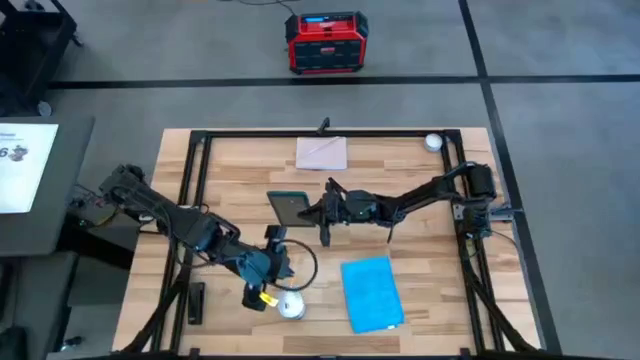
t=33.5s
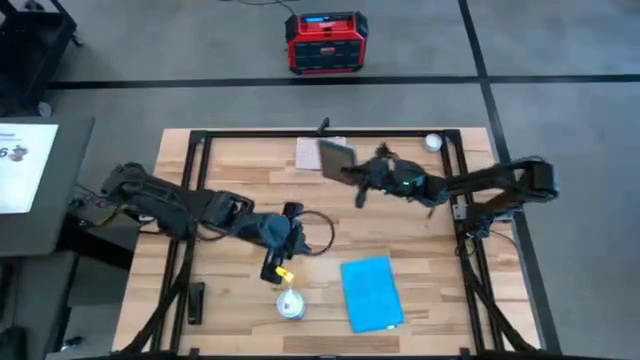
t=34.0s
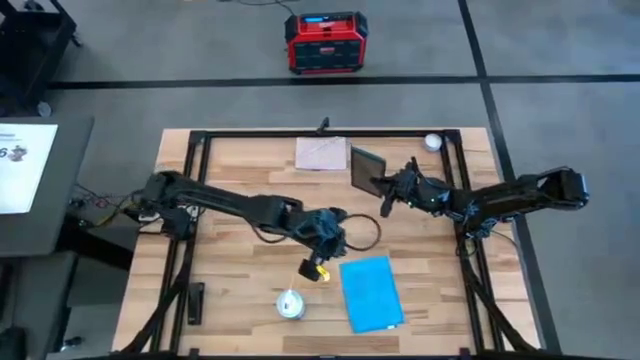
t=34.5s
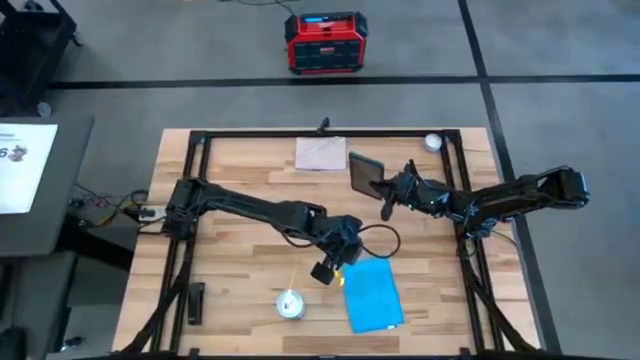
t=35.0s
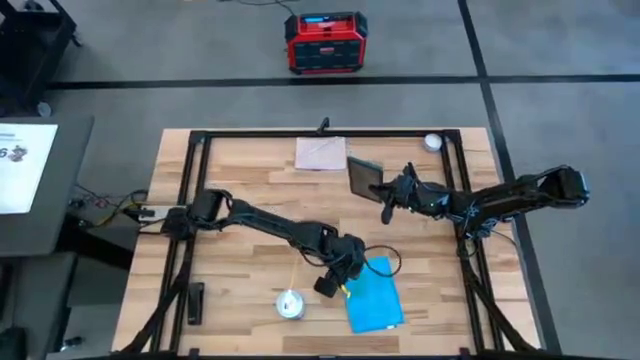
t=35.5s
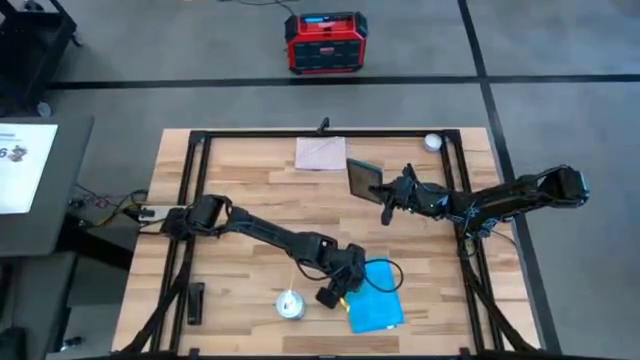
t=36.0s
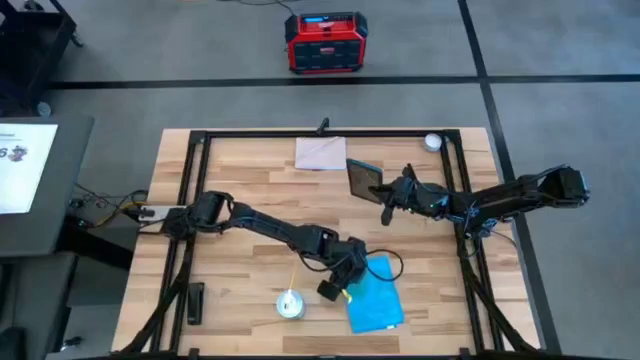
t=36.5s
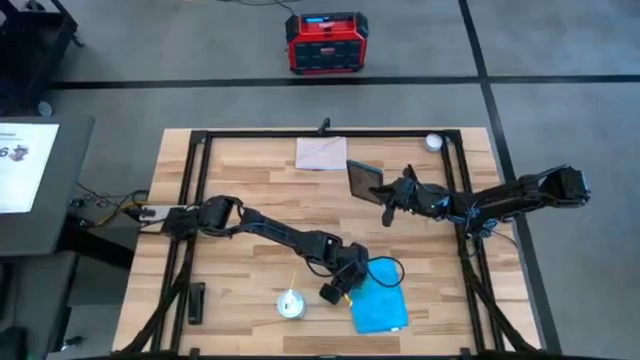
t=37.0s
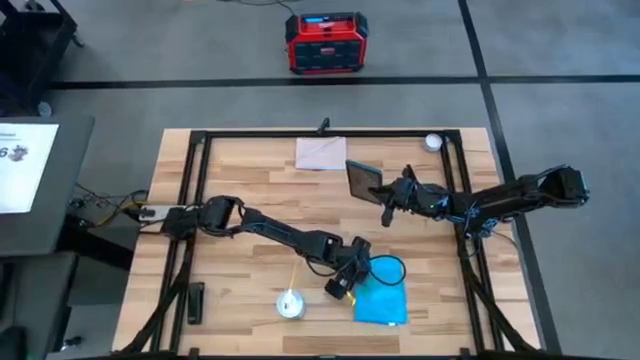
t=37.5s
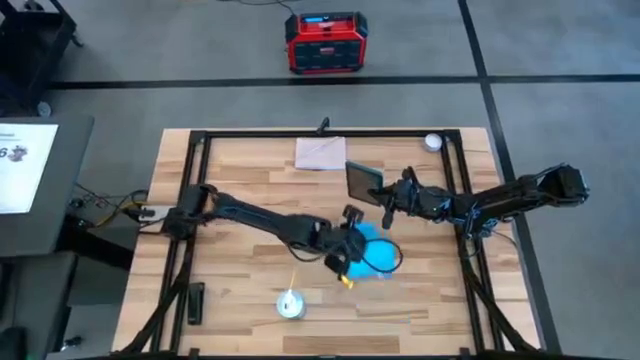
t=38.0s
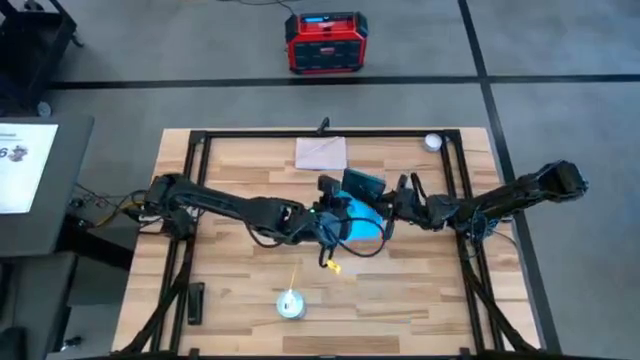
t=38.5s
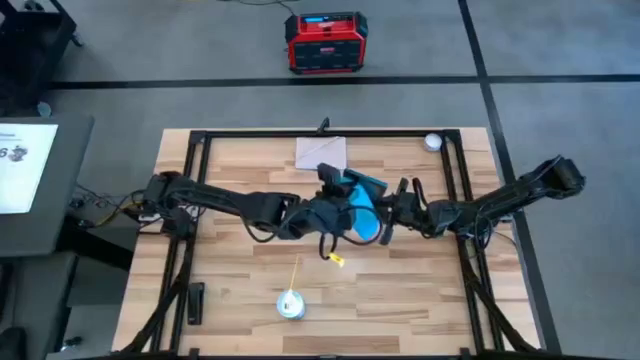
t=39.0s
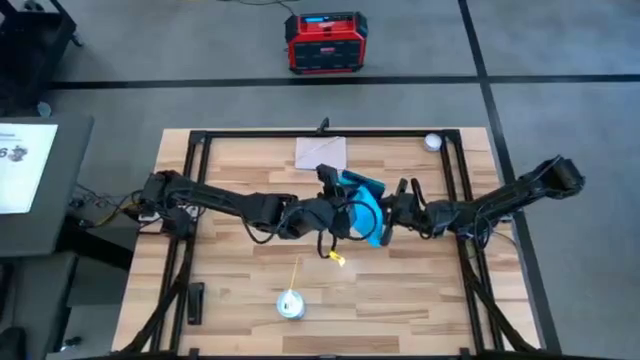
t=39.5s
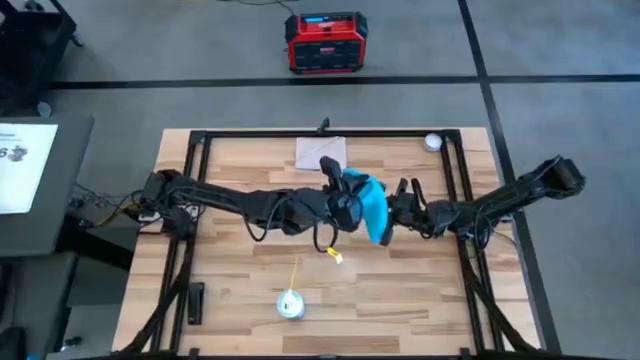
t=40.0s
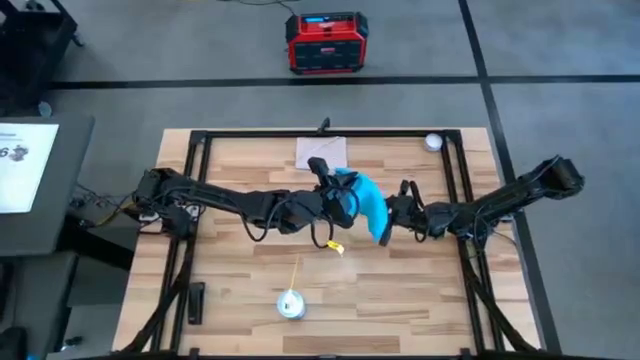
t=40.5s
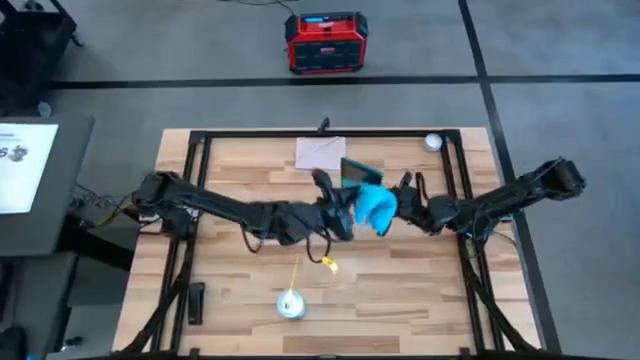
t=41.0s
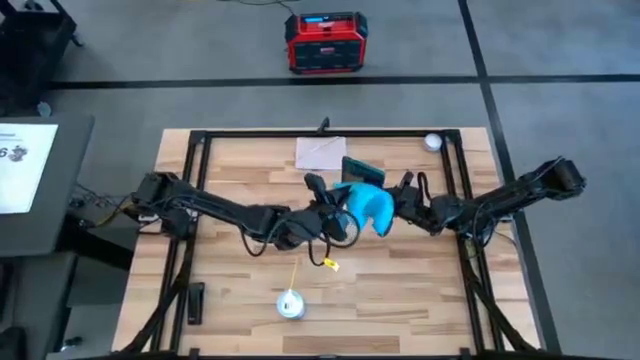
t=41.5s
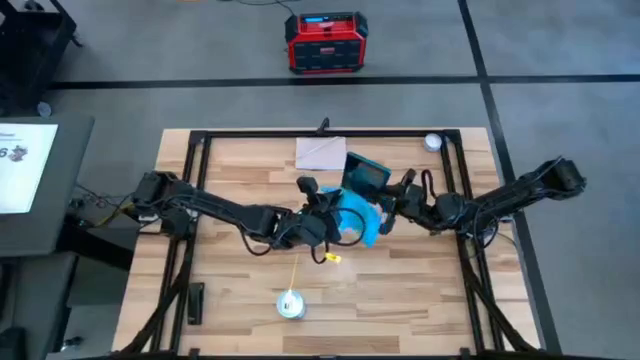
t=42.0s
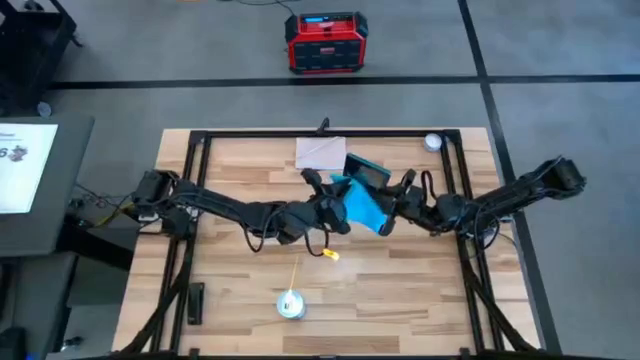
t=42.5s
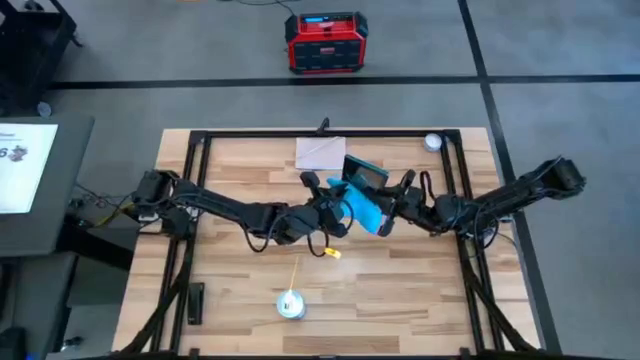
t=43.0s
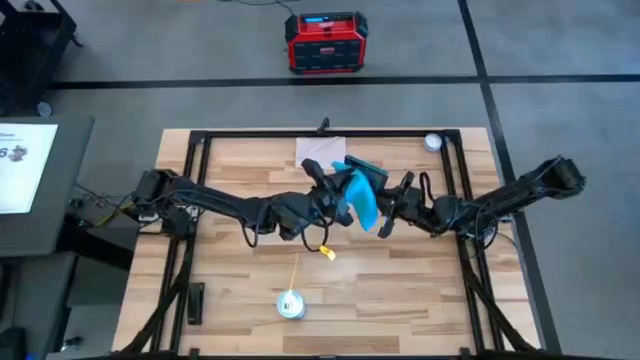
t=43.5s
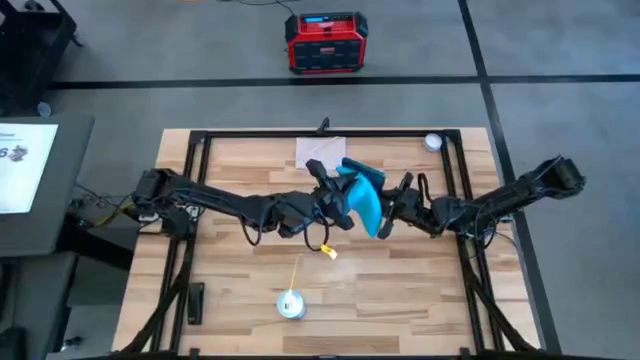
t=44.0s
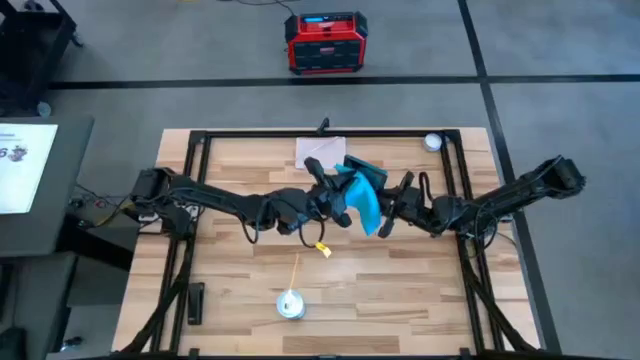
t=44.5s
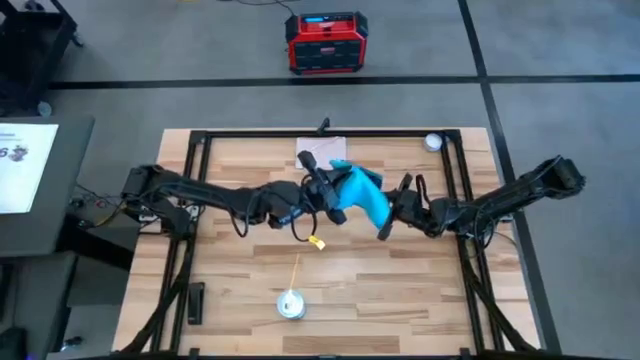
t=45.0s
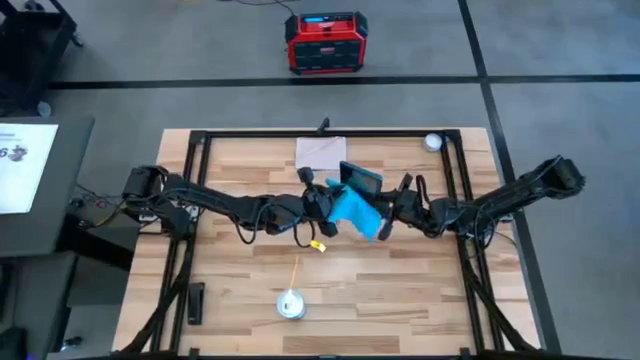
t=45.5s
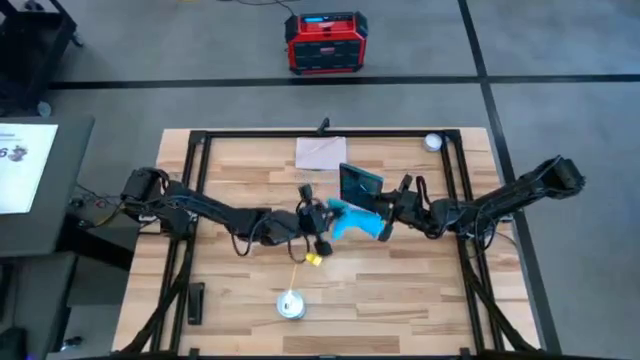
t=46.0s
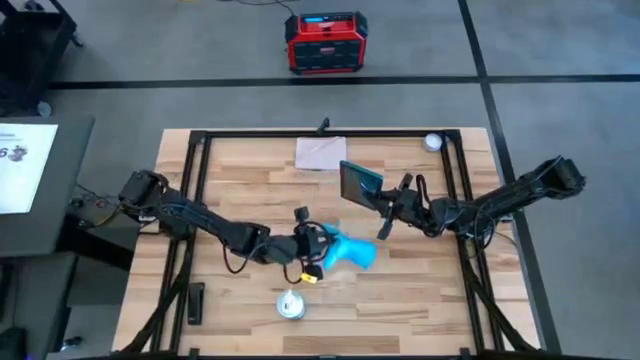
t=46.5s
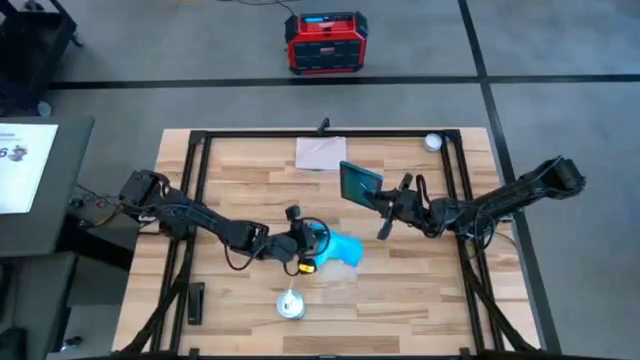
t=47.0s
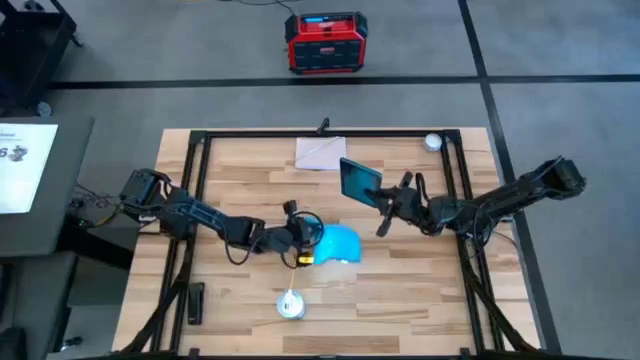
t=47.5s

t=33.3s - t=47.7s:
Task: Apply microfiber cloth
Wipe the front of the tablet with a blue microfiber cloth

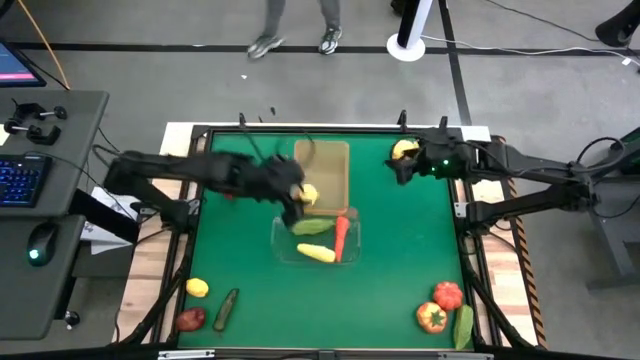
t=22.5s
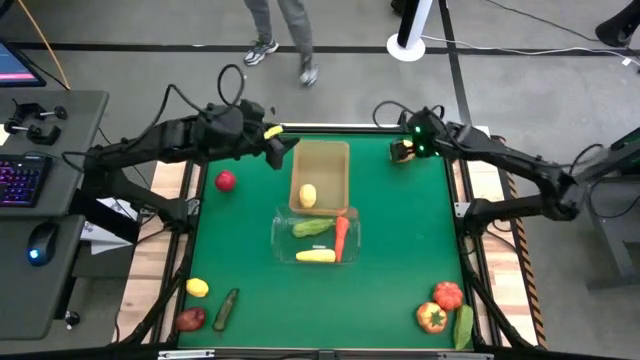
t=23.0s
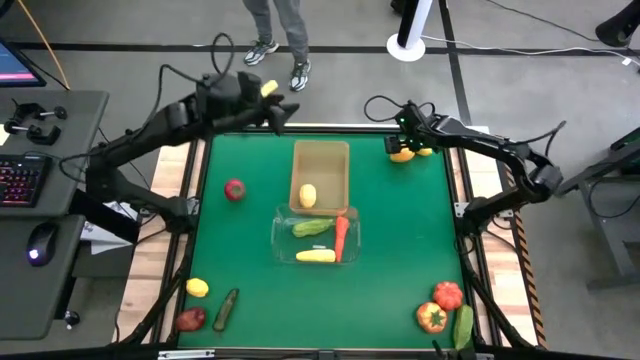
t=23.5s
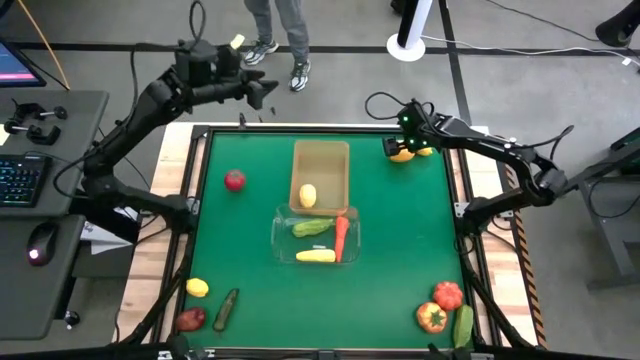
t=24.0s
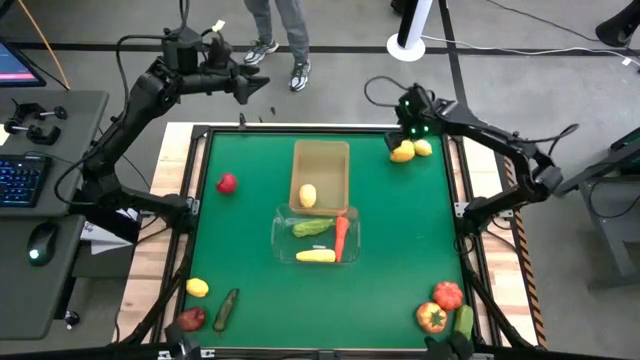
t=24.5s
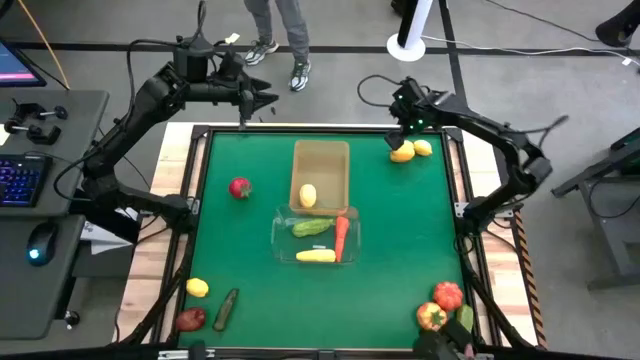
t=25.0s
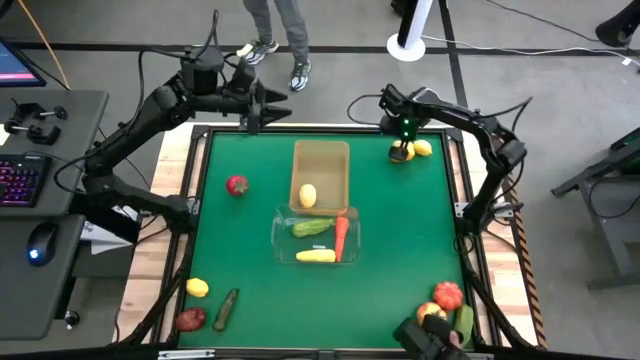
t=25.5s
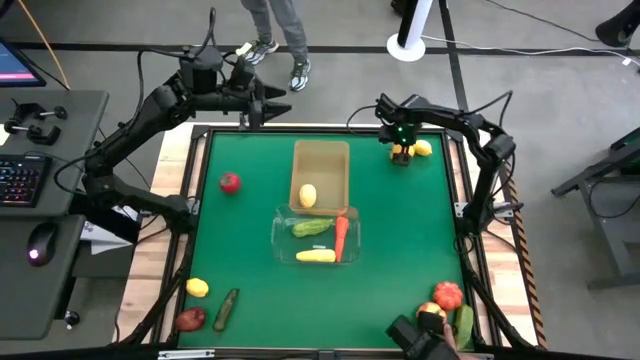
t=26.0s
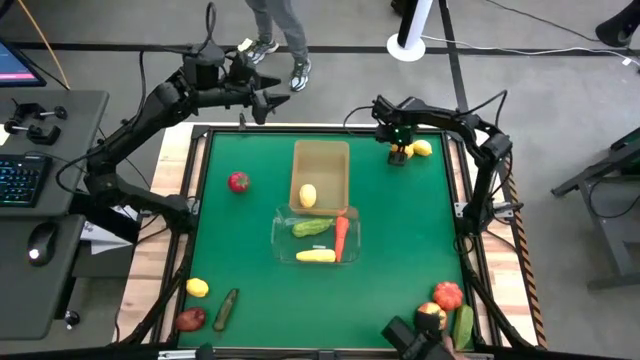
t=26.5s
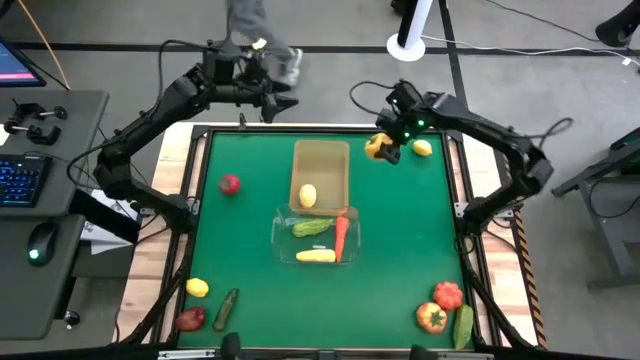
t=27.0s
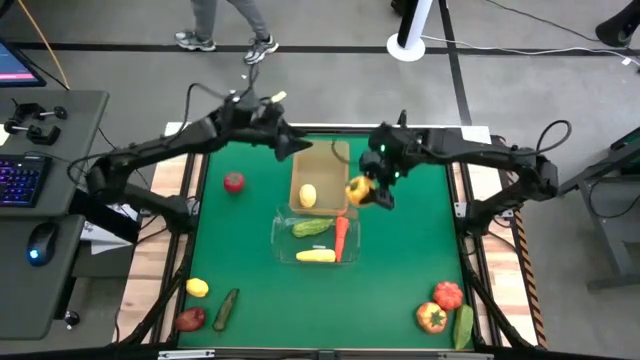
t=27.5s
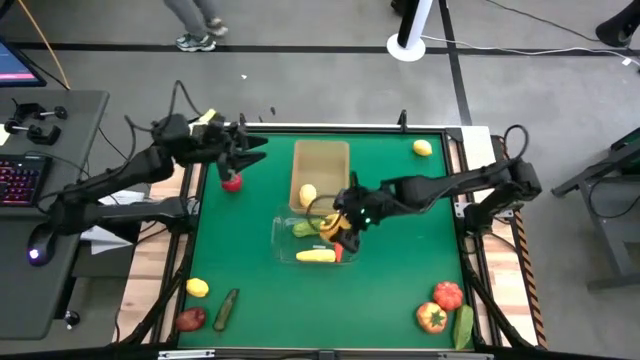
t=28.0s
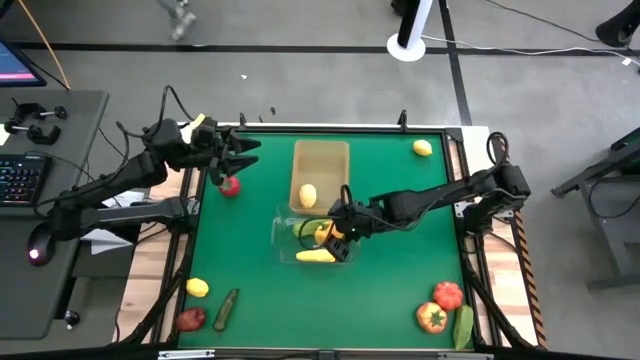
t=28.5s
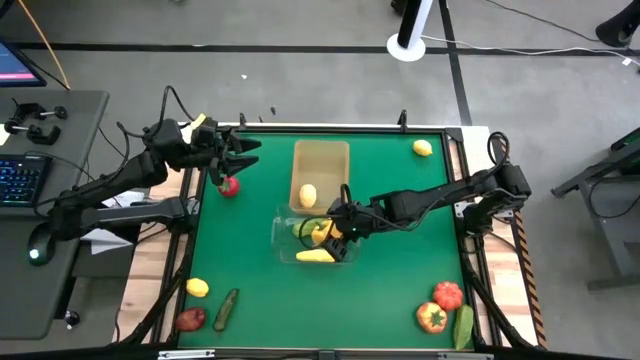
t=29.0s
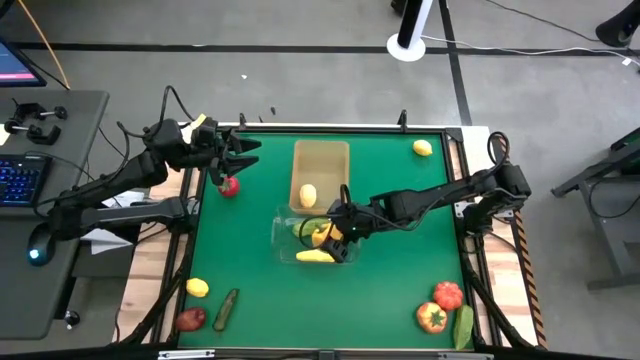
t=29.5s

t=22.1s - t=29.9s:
Task: Sort produce into baskets
Put the yellow bell pepper into the transparent bin
